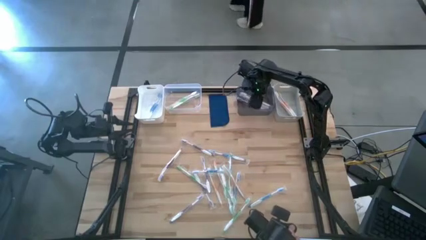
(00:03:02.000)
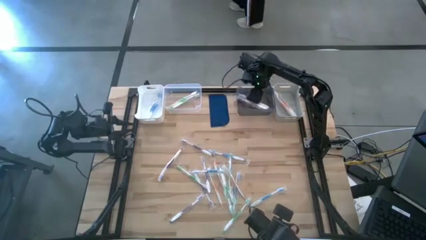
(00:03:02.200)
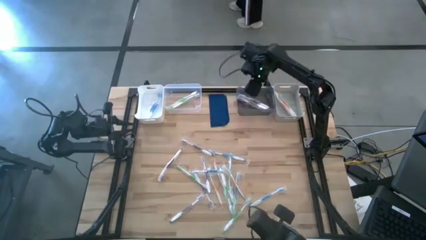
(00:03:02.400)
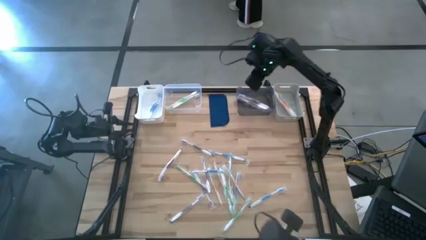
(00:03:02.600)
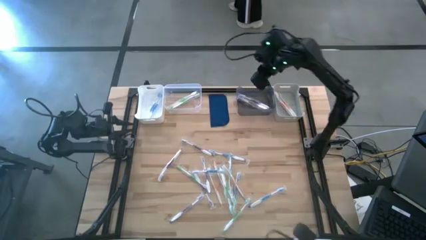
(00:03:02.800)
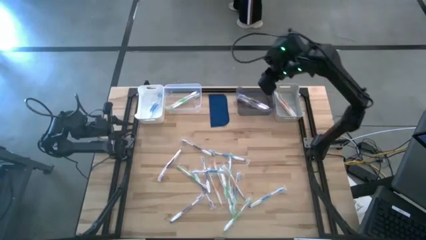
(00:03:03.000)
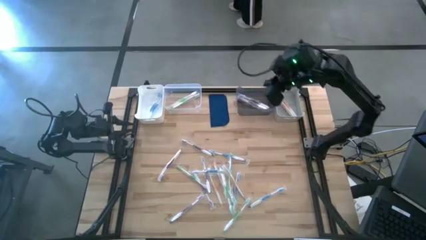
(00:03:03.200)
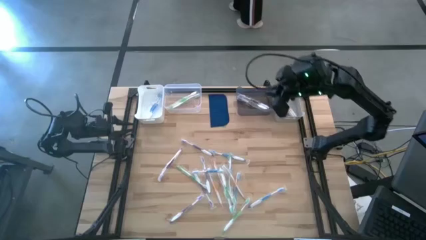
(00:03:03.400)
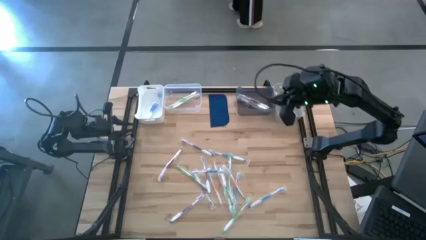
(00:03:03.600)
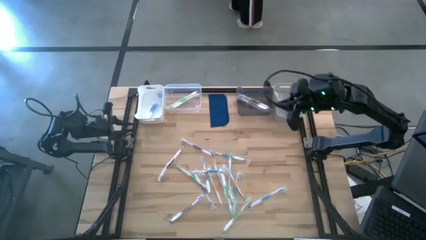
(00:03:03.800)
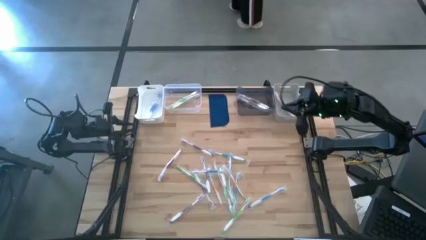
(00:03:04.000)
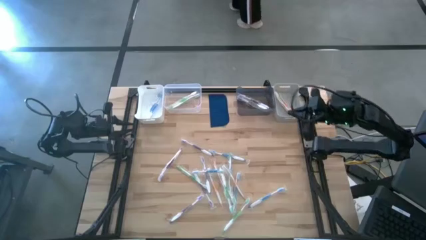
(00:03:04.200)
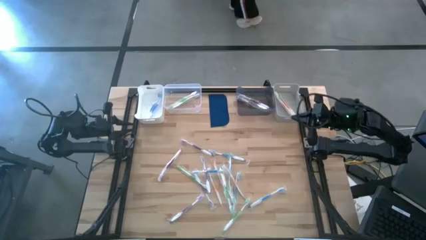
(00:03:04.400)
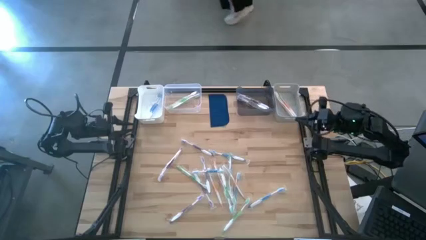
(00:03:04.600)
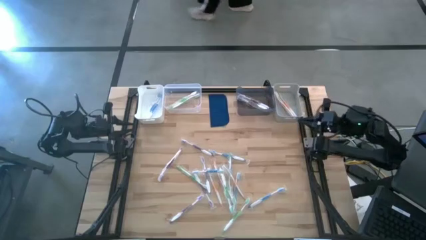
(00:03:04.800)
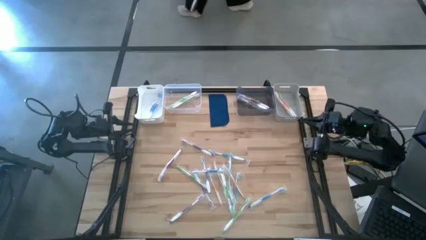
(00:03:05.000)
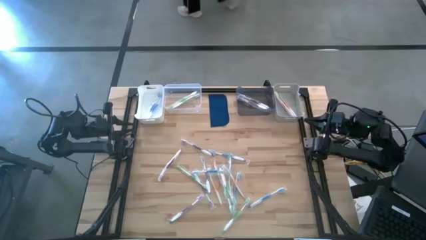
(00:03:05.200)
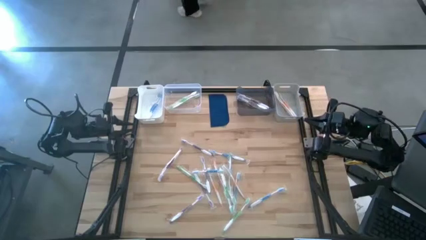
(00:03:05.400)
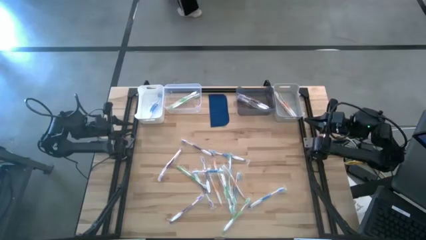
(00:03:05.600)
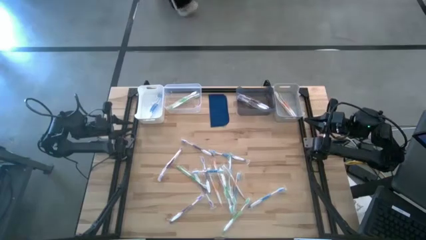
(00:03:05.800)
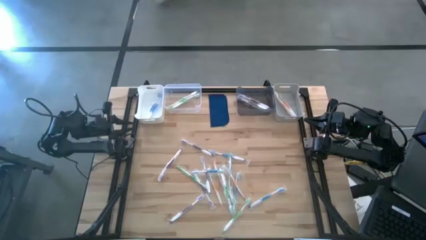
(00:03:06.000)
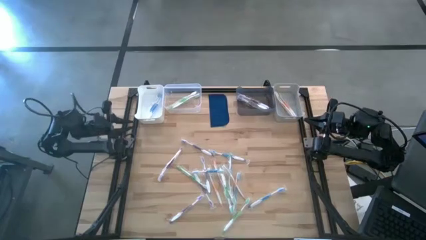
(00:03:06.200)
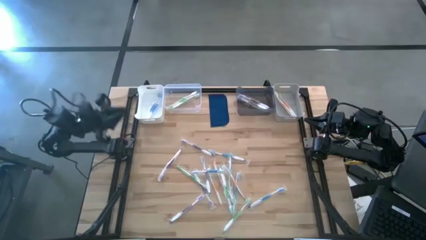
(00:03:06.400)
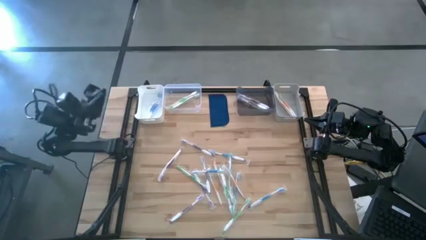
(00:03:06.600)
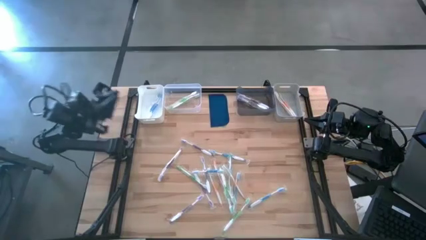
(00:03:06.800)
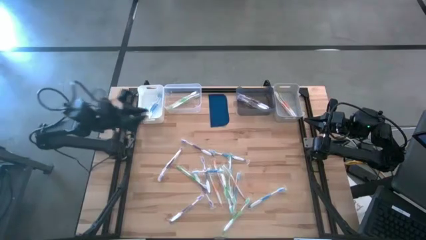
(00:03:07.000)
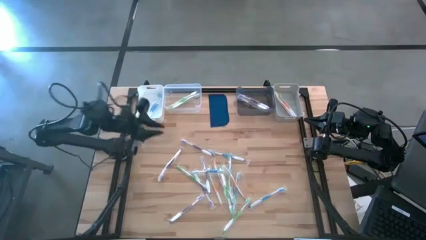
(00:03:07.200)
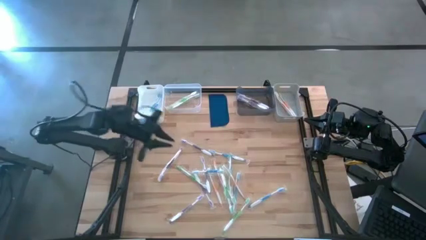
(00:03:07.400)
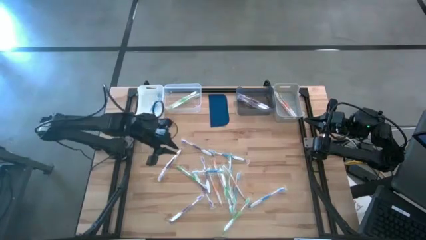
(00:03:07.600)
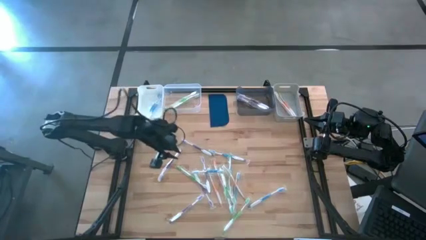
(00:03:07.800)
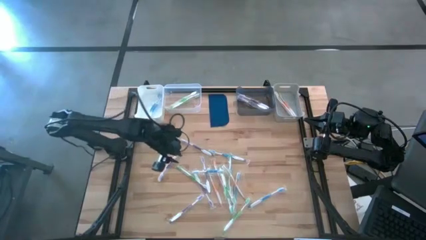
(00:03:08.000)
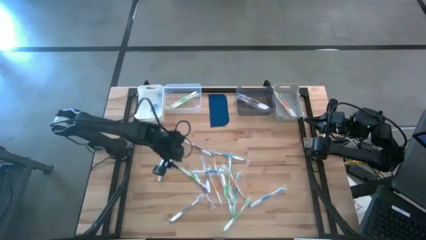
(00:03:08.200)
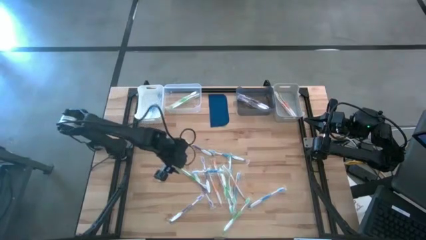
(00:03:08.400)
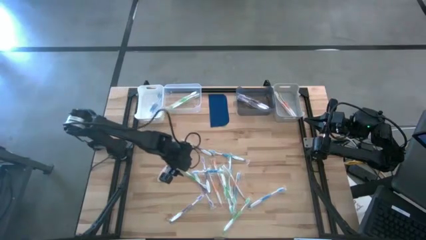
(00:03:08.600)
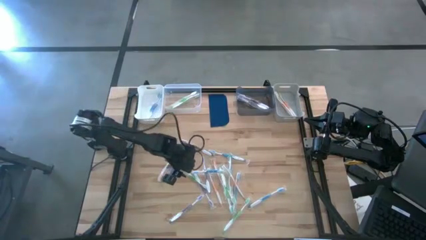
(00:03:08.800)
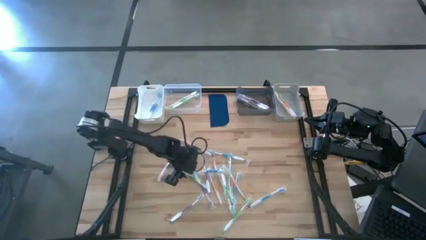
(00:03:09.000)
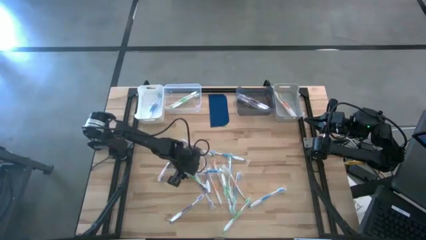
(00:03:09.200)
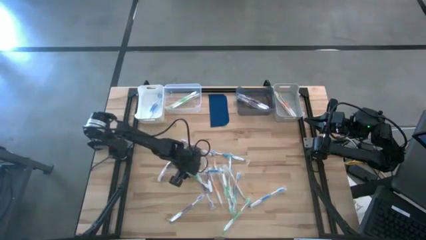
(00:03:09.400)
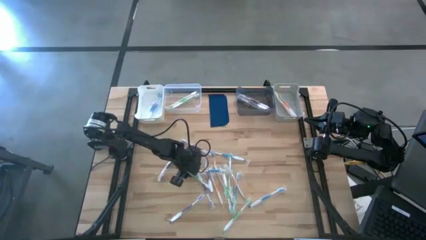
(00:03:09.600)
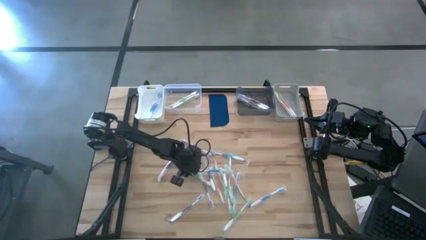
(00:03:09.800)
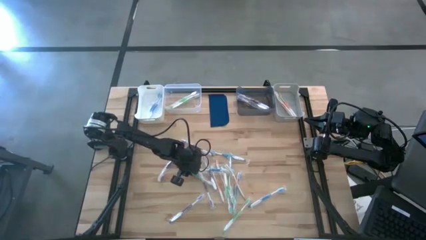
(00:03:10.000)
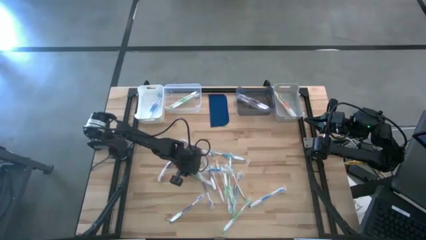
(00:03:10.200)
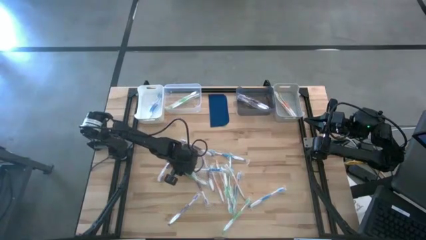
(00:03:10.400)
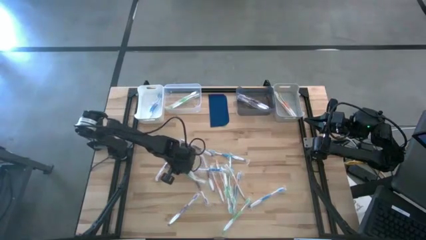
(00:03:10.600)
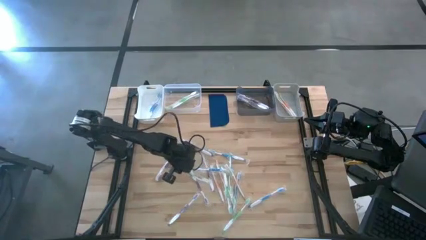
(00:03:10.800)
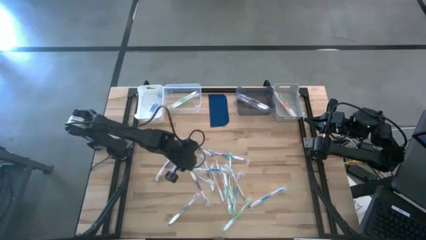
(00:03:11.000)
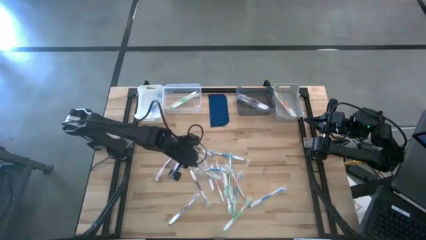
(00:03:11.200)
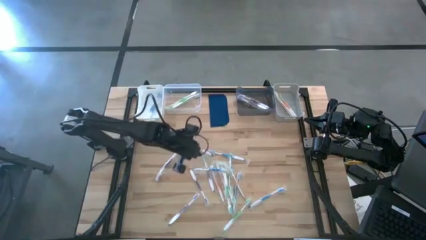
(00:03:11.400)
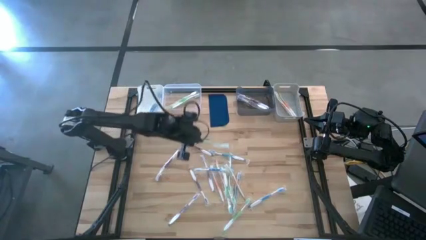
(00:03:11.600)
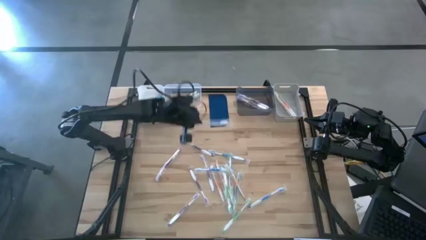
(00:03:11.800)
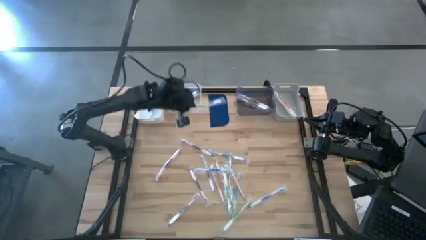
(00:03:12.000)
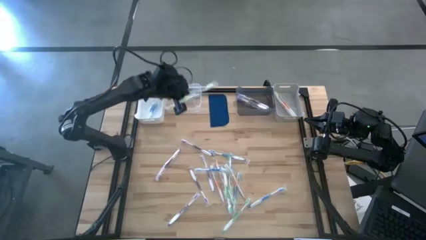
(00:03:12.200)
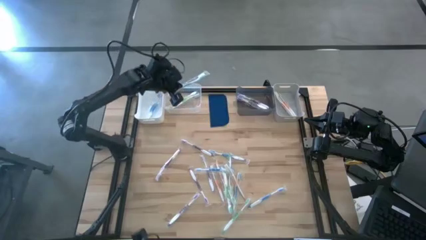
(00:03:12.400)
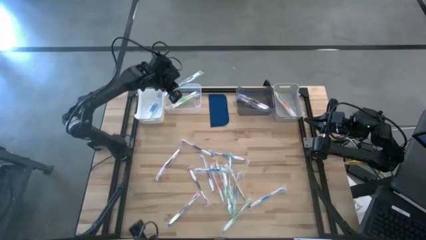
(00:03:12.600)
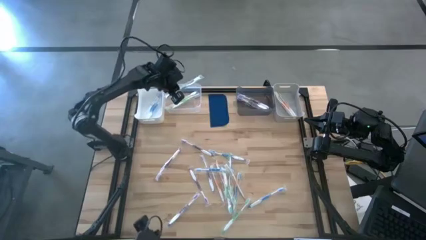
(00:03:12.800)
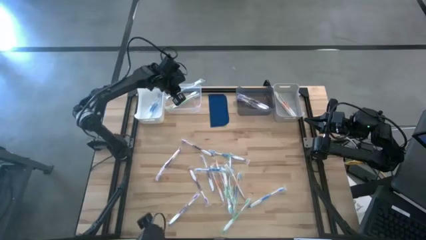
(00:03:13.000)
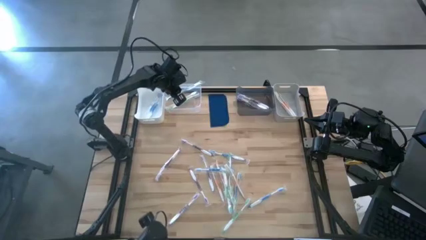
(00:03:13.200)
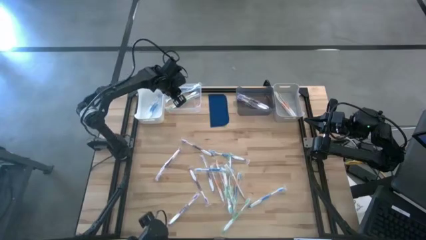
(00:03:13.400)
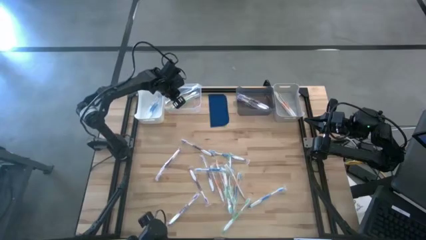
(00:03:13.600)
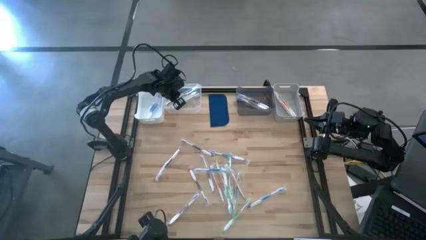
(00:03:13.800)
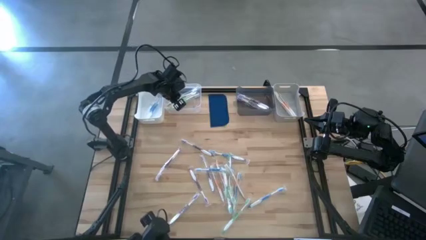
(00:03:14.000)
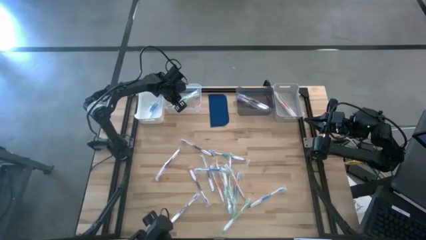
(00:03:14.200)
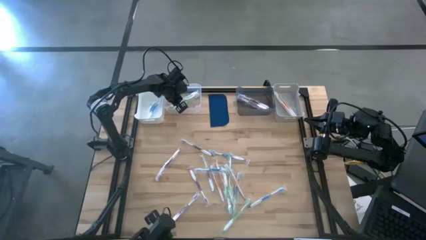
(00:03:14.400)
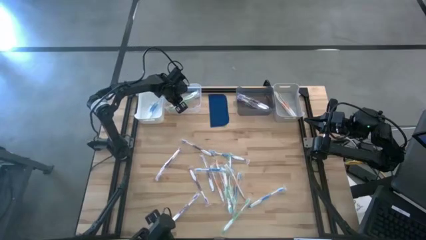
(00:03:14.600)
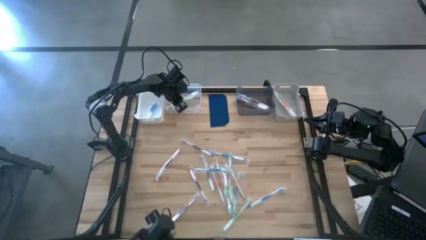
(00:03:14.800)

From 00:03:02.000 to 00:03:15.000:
Task: Pick & Place Toothbrushes
Put the green toothbrush into the transparent bin

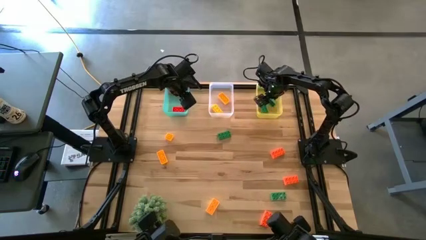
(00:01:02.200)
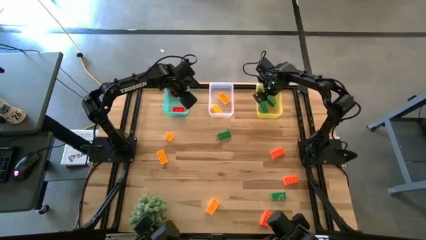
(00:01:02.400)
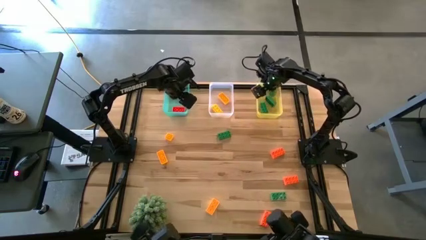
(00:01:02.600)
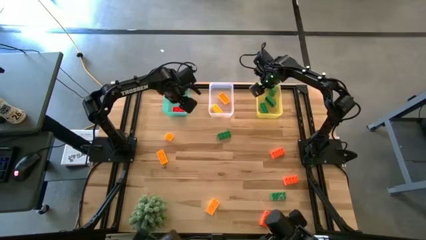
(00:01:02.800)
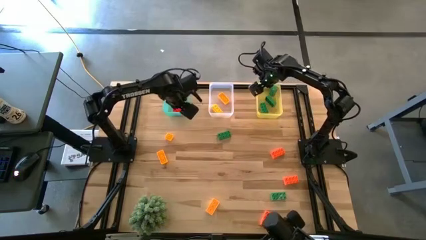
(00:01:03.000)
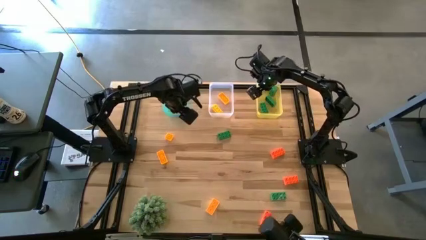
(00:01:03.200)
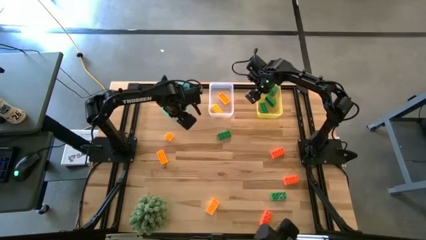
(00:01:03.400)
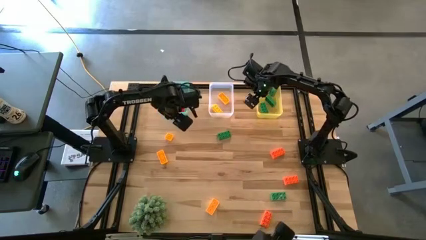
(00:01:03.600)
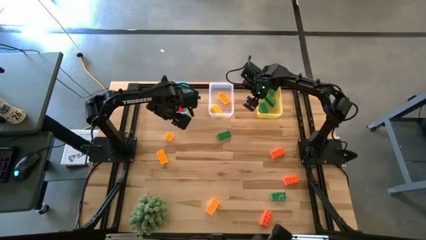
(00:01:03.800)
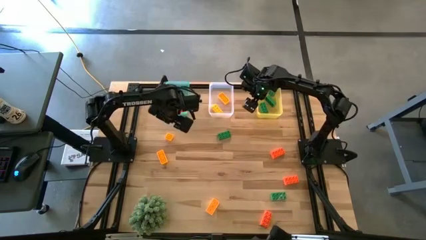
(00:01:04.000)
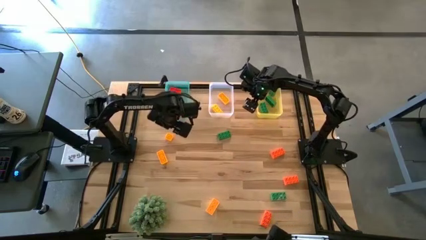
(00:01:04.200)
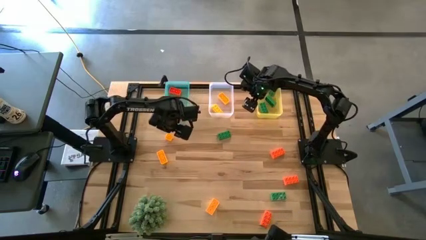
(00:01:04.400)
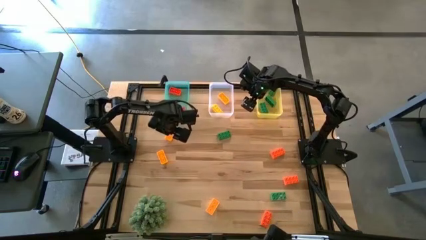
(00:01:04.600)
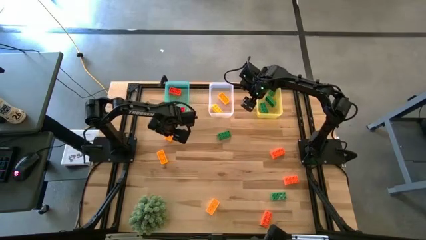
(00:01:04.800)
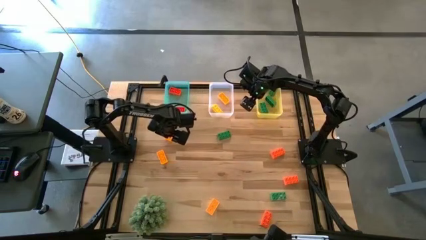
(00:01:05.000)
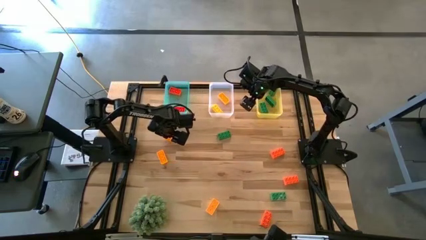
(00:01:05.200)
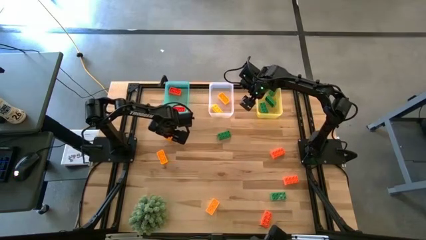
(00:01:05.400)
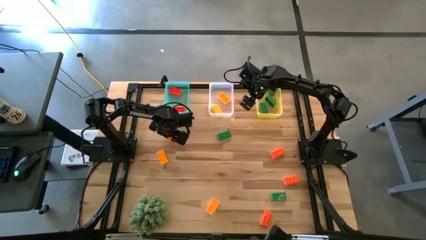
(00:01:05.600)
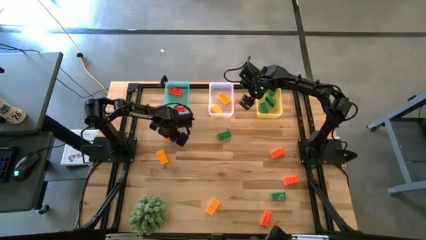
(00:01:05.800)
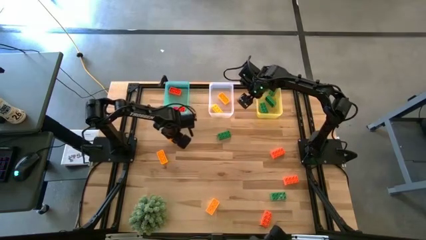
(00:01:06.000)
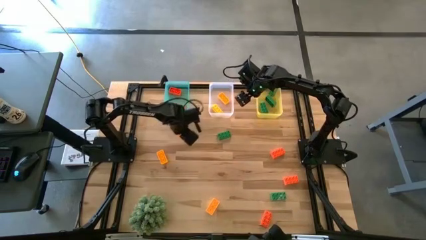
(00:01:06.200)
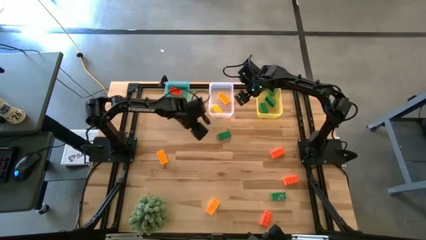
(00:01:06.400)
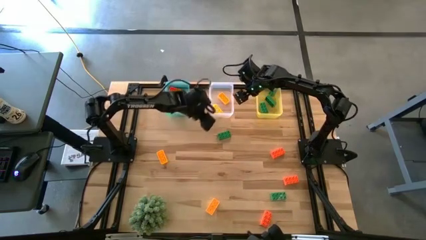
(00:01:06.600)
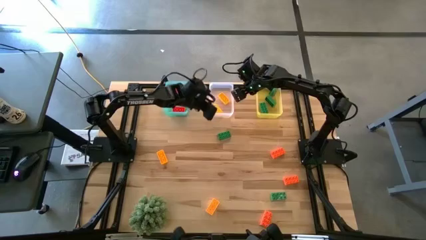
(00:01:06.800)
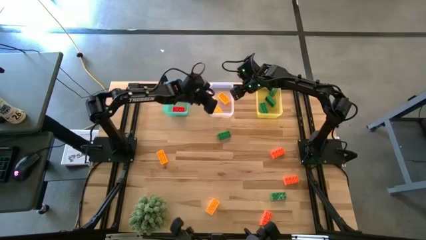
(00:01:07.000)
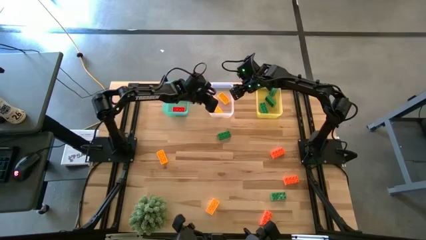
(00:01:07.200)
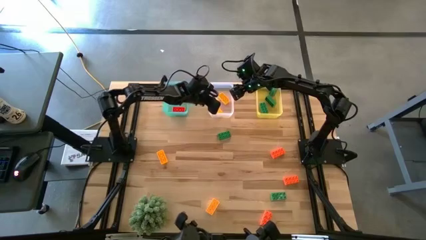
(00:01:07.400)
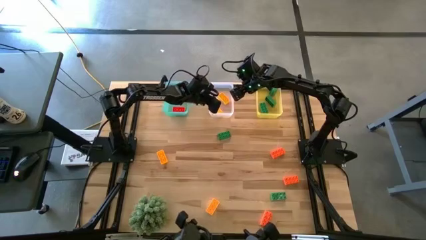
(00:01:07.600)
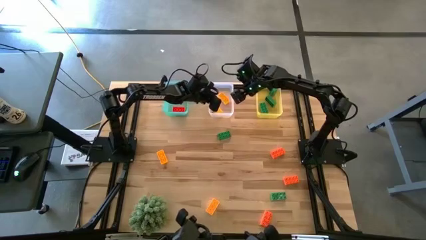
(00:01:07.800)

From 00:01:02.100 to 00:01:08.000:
Task: Sort & place blocks by color
Put the yellow game piece into the white bin
